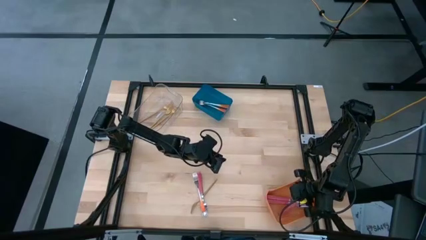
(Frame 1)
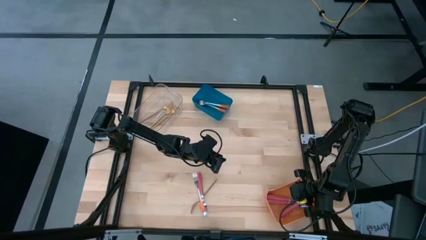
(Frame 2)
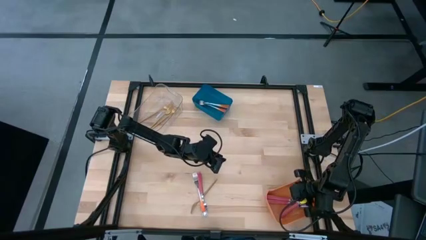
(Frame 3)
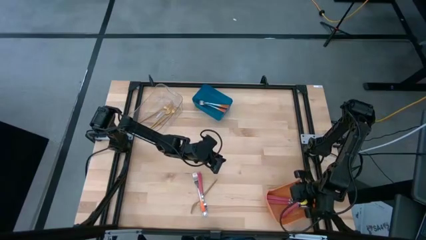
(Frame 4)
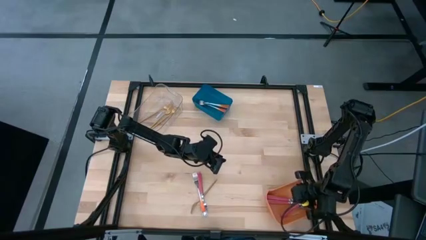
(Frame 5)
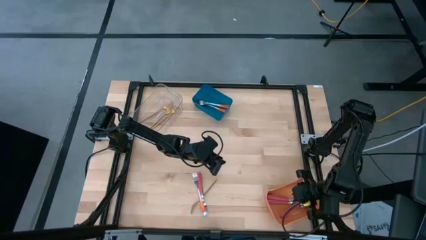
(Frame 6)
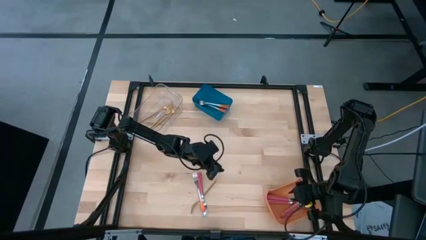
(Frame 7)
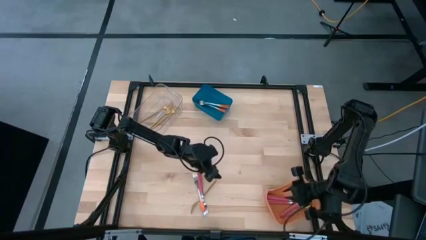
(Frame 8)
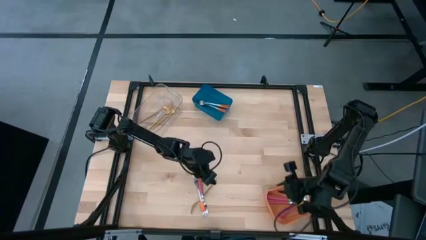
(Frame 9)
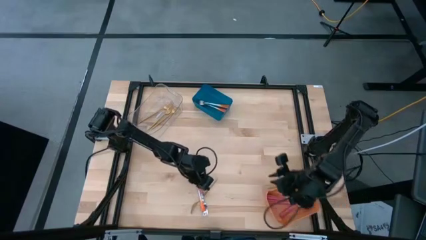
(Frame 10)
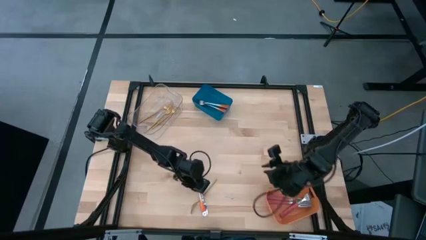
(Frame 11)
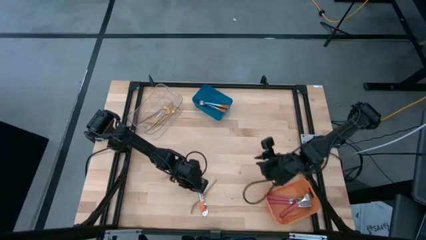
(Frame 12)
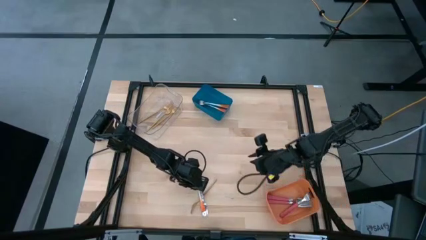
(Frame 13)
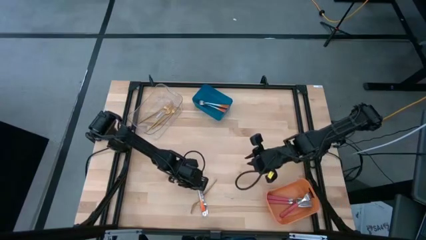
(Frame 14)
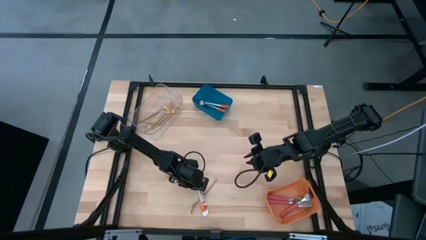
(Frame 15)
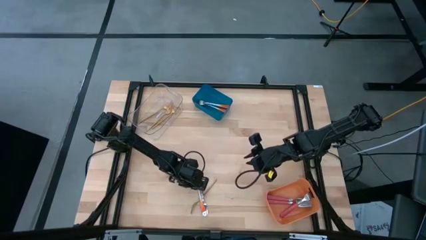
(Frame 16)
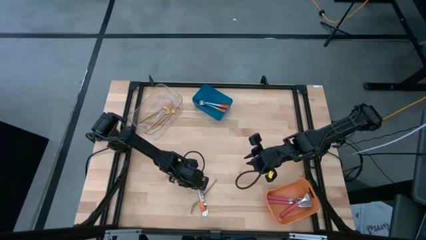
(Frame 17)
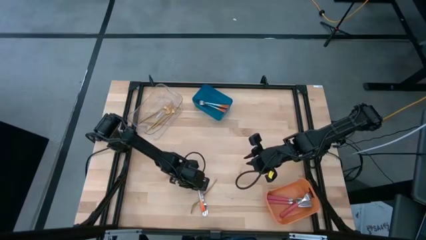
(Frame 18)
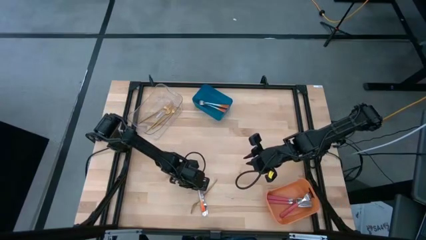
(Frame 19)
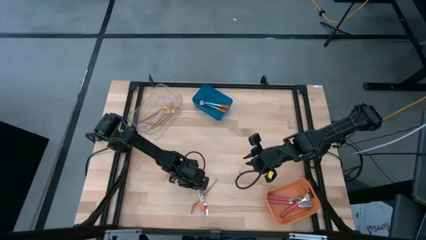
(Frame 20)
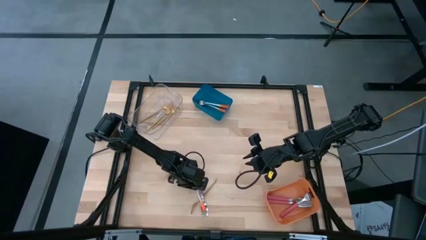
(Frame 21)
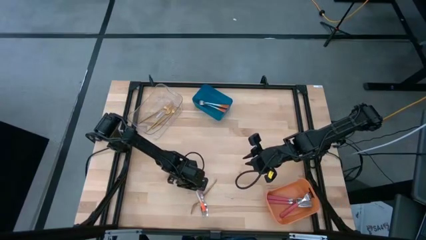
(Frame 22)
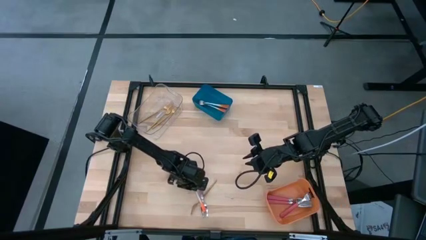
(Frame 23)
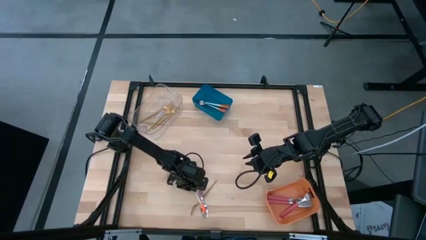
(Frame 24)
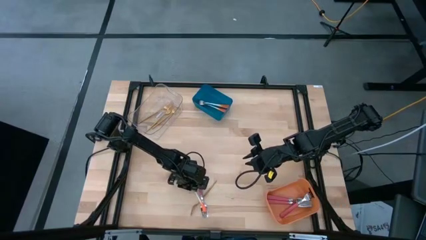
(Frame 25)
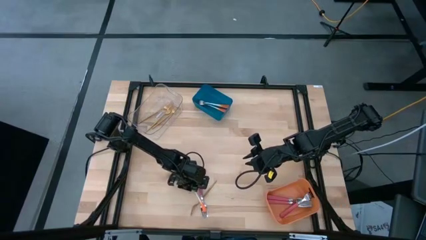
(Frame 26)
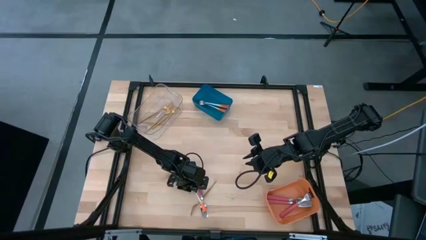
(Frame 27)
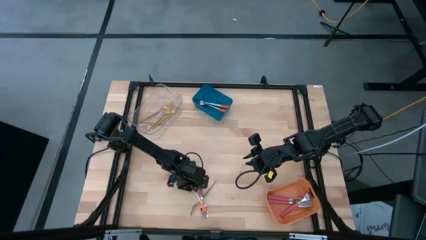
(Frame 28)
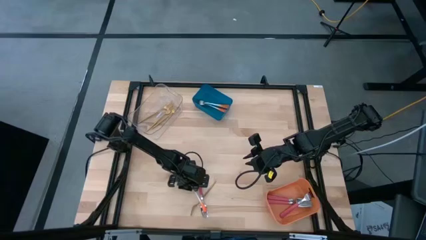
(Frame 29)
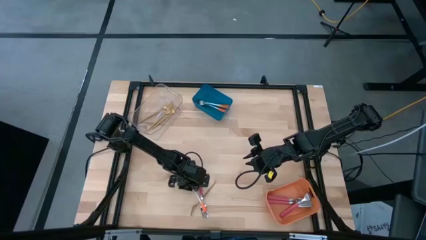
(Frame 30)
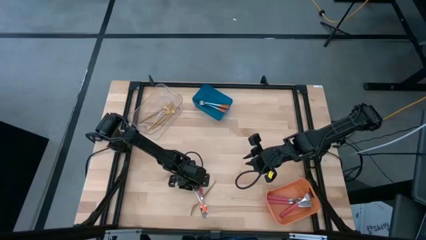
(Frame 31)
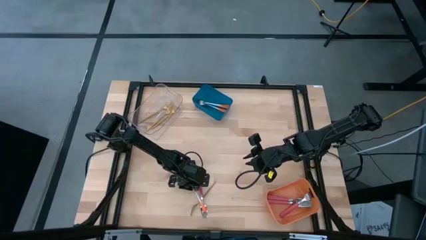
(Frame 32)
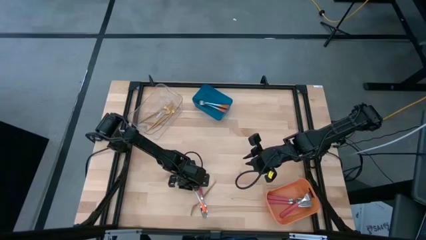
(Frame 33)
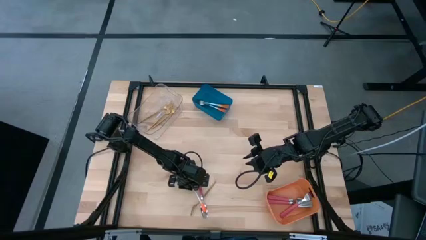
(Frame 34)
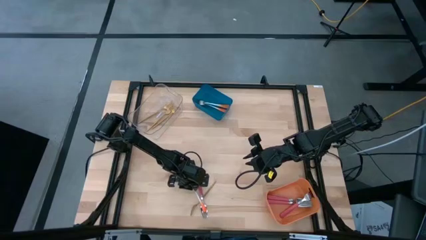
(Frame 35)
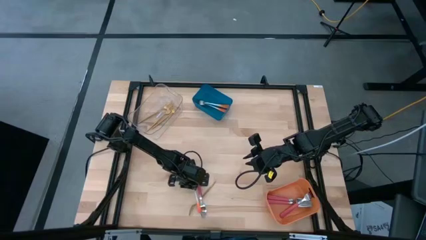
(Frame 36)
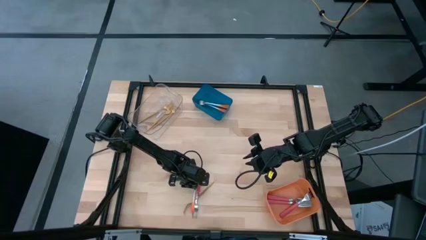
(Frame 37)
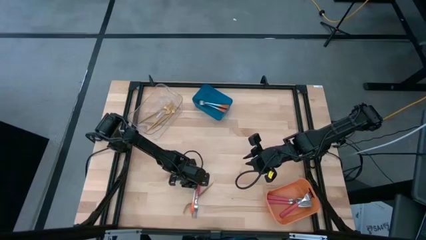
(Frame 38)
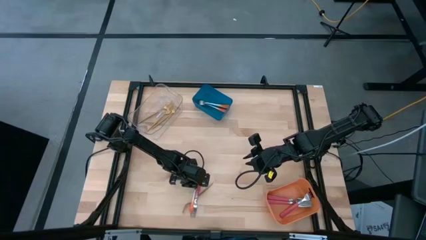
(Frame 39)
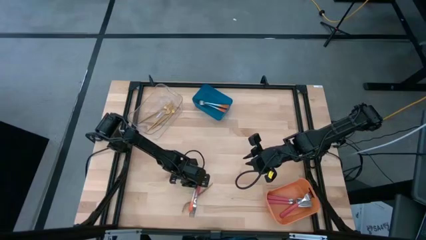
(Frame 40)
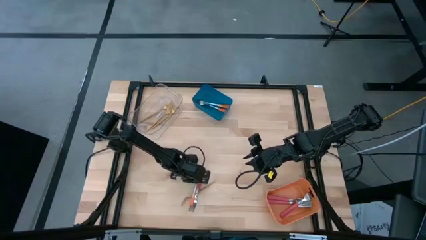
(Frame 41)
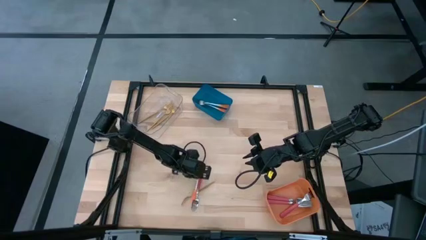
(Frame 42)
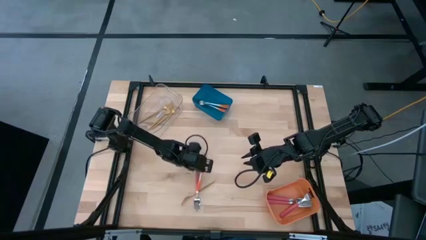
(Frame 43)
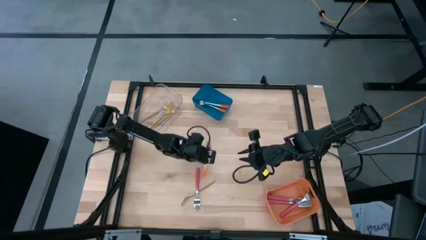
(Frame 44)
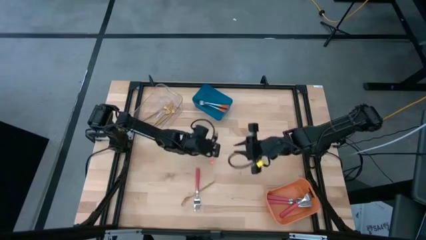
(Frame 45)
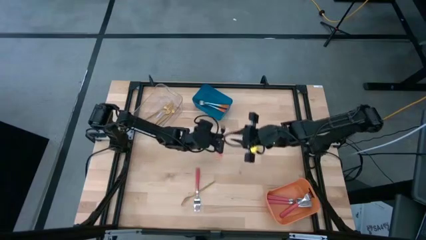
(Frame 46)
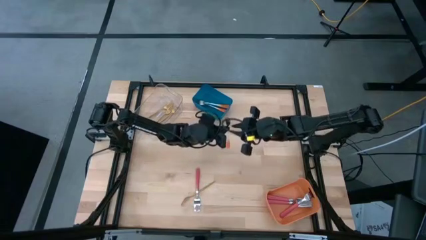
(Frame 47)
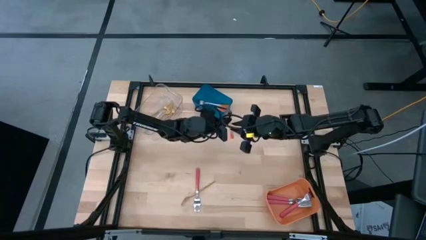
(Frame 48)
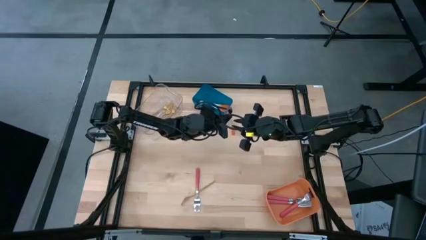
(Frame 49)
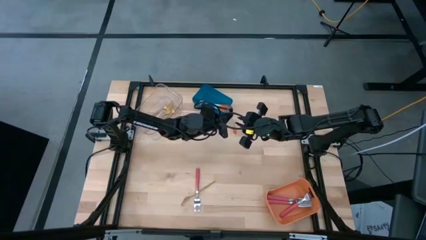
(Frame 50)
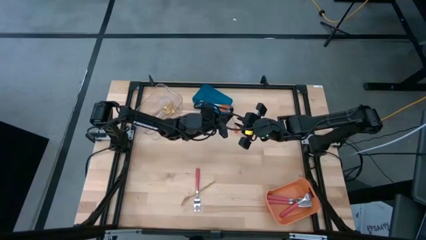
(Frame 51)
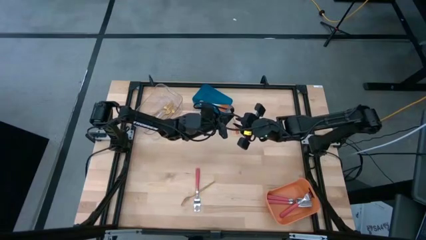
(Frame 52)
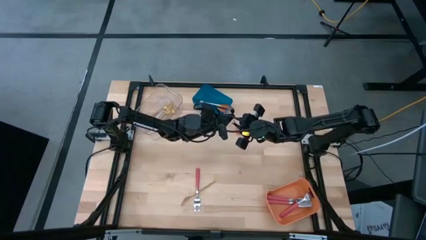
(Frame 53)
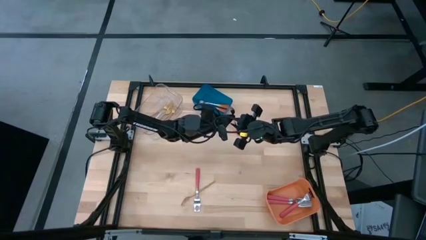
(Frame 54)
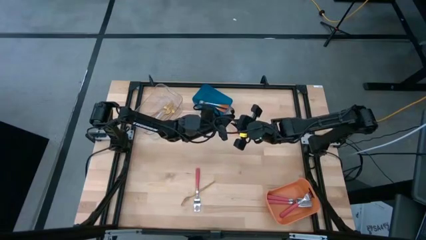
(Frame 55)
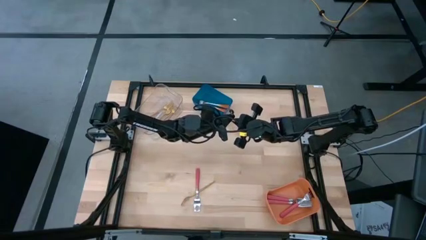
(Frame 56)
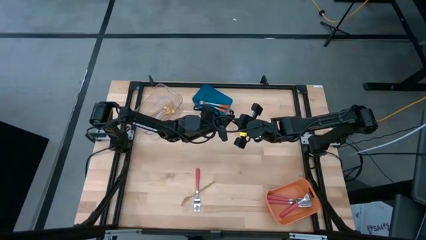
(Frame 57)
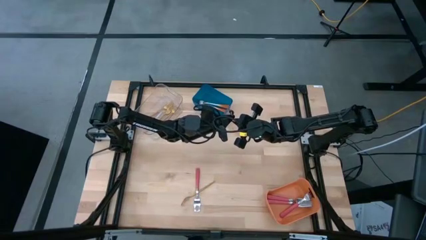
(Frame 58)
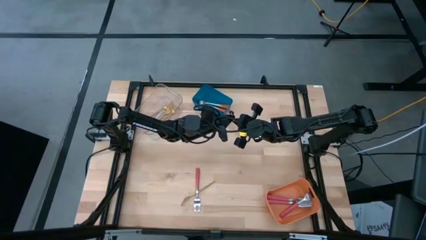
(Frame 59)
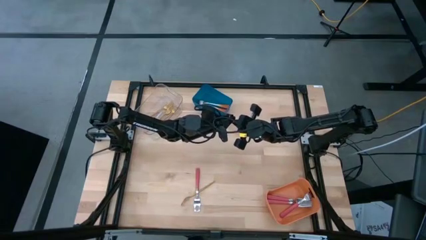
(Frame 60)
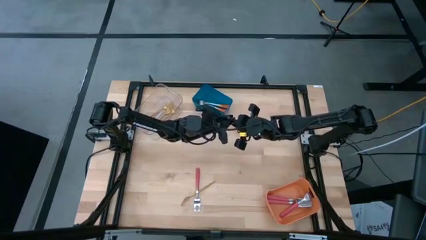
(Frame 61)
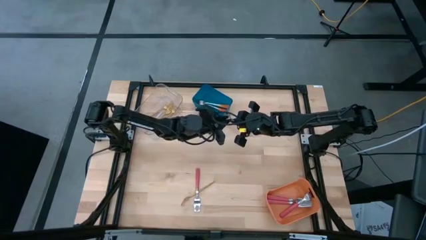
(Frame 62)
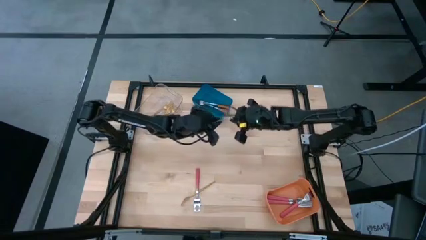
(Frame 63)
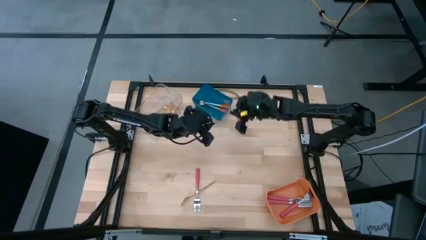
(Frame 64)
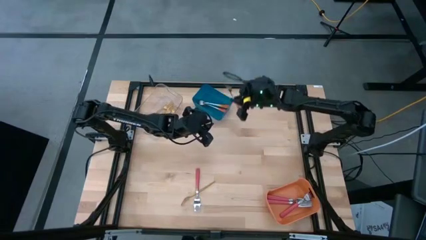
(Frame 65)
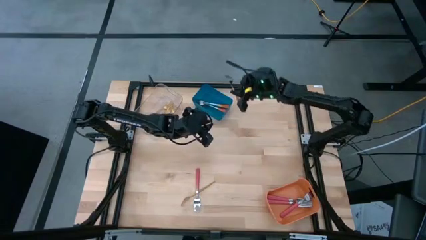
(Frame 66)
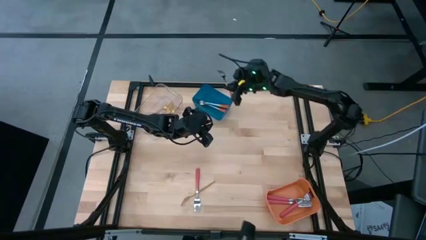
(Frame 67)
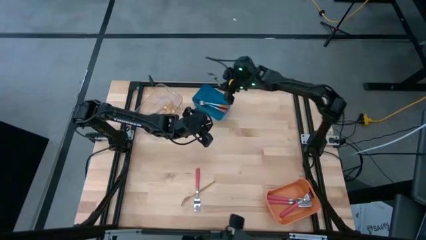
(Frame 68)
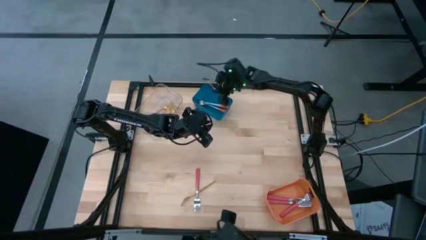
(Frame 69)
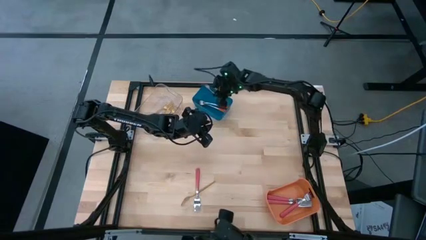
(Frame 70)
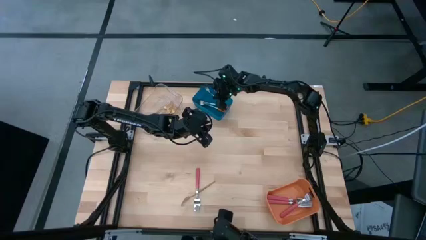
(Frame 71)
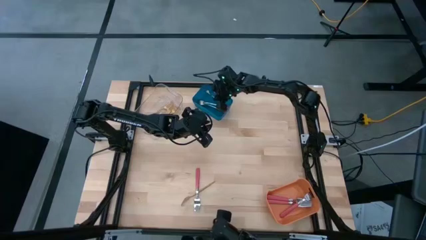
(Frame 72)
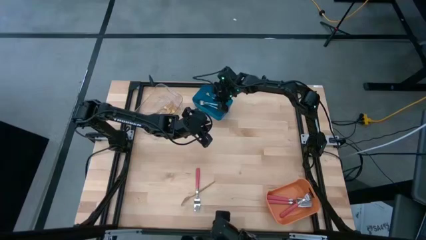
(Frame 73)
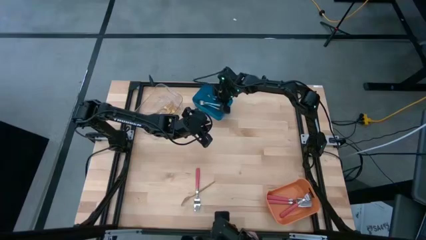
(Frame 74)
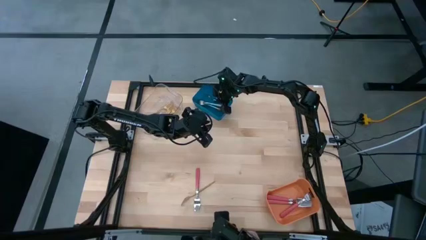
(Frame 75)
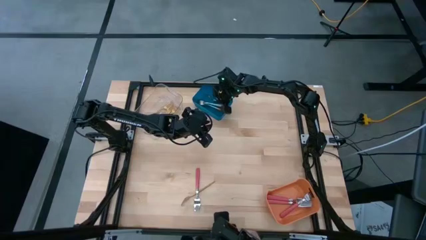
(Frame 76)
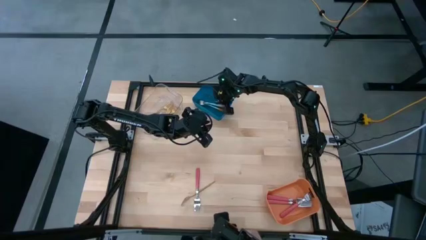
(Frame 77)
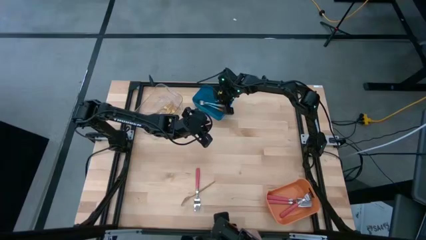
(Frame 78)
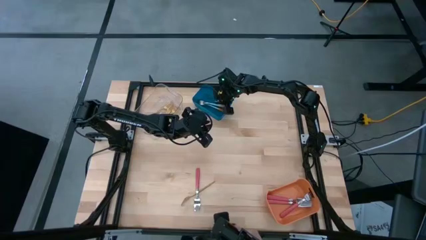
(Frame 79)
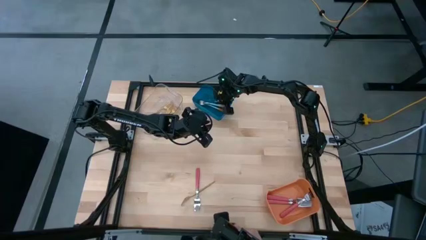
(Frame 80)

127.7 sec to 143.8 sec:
Task: Sort silverware by color (type)
Put the orange fork into the blue bin
